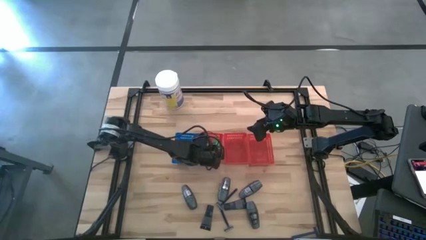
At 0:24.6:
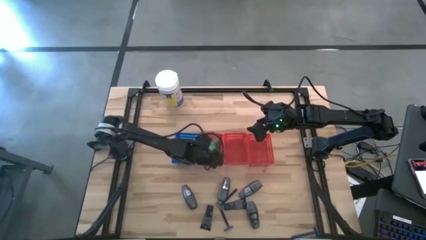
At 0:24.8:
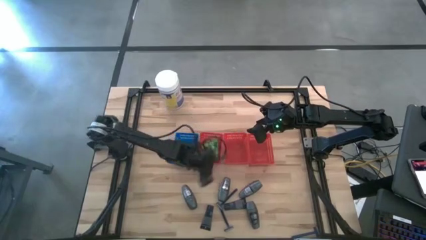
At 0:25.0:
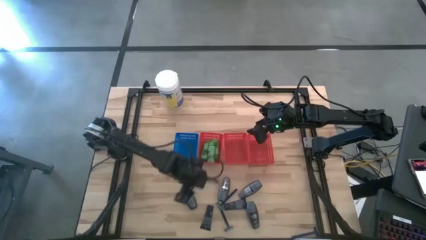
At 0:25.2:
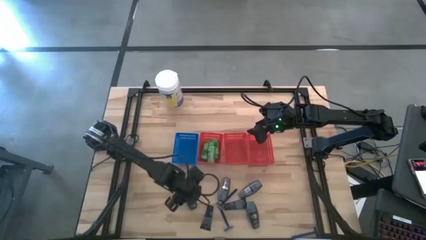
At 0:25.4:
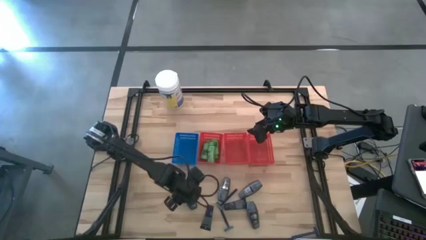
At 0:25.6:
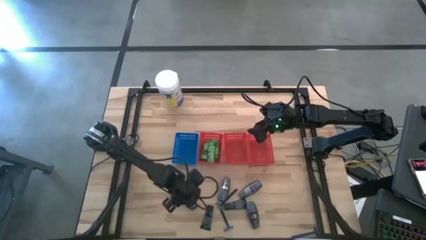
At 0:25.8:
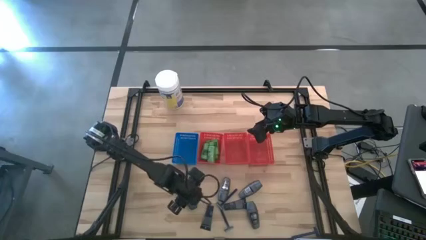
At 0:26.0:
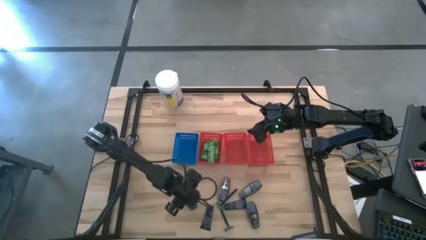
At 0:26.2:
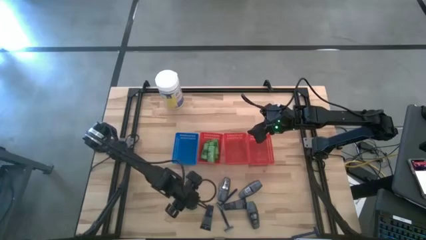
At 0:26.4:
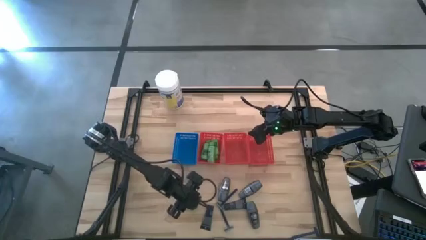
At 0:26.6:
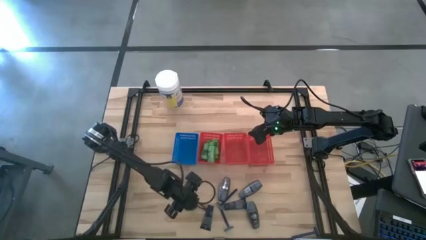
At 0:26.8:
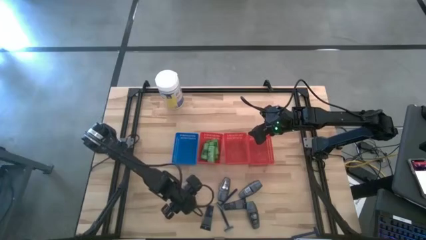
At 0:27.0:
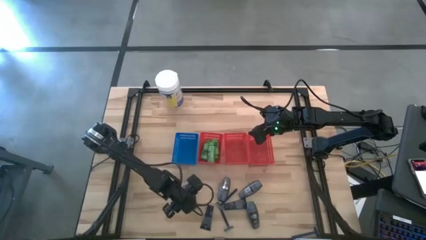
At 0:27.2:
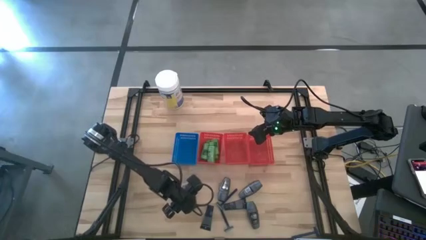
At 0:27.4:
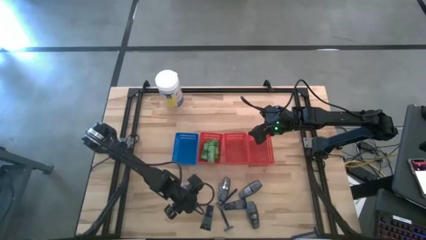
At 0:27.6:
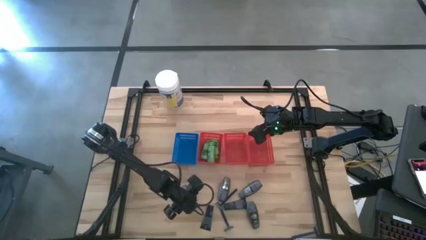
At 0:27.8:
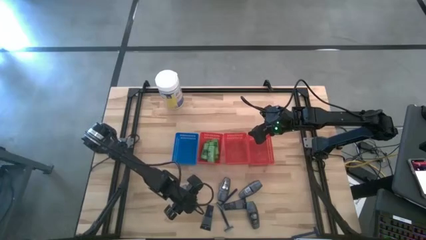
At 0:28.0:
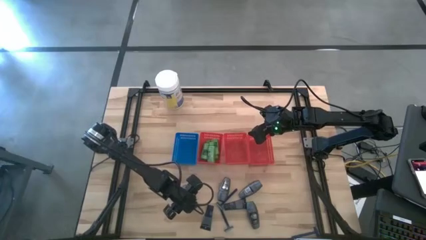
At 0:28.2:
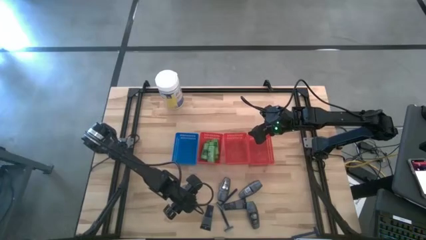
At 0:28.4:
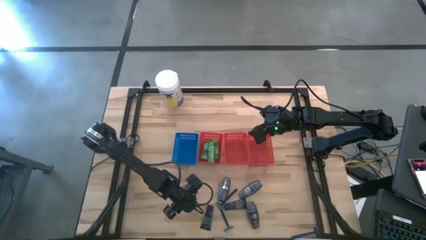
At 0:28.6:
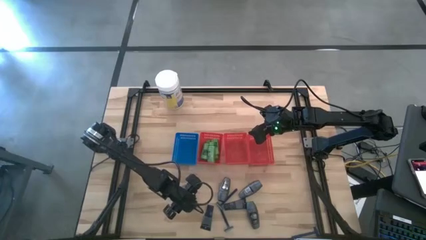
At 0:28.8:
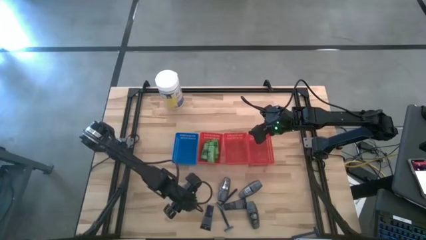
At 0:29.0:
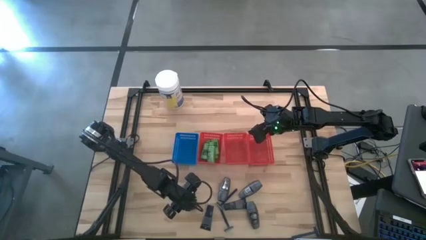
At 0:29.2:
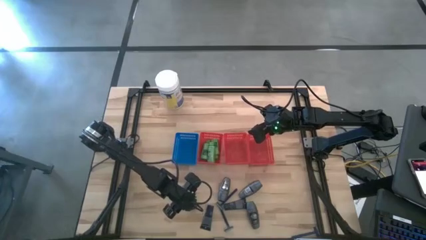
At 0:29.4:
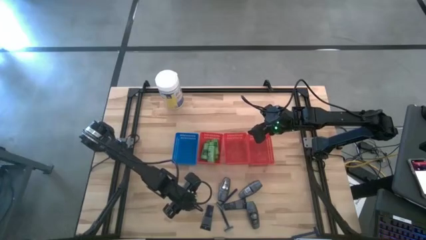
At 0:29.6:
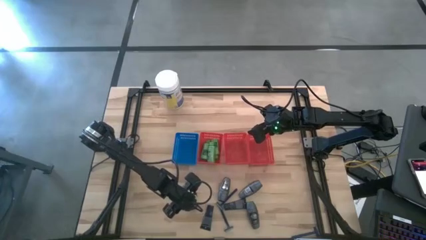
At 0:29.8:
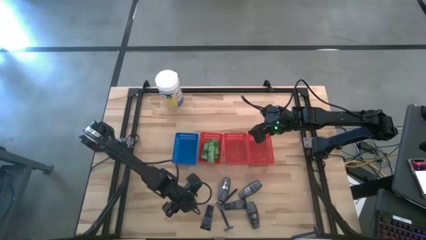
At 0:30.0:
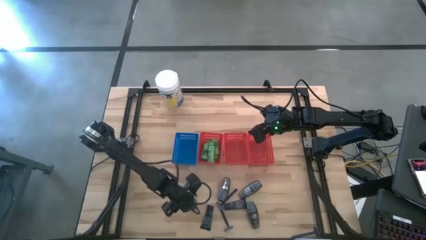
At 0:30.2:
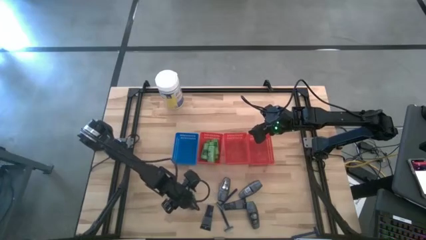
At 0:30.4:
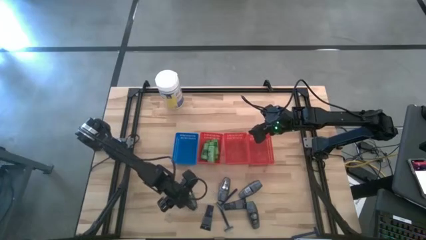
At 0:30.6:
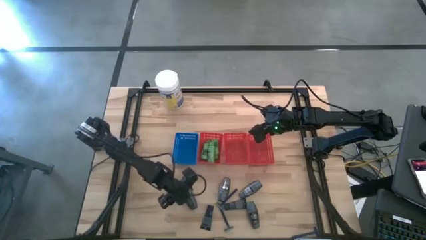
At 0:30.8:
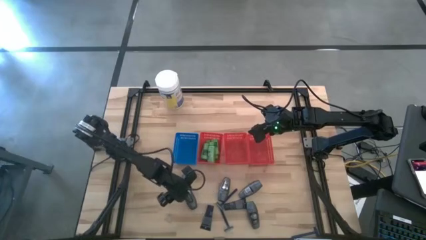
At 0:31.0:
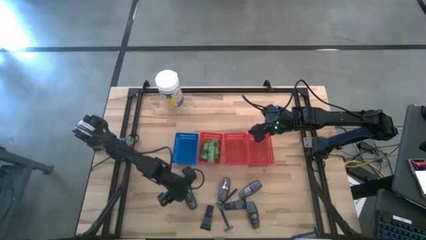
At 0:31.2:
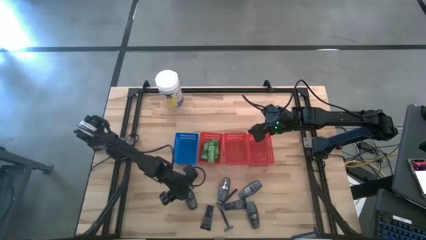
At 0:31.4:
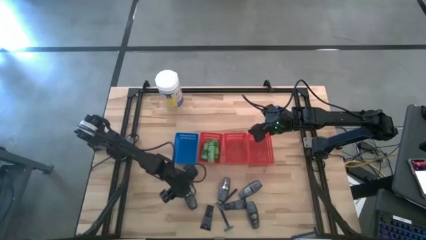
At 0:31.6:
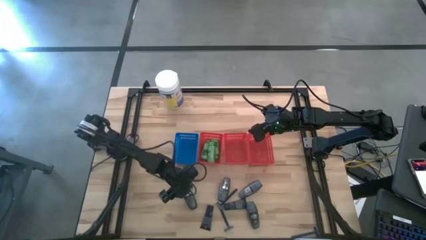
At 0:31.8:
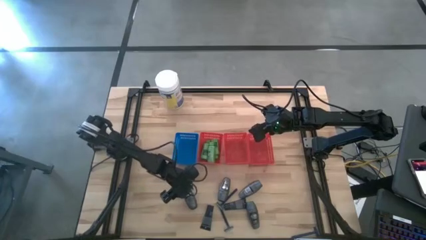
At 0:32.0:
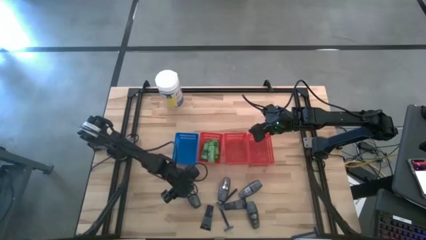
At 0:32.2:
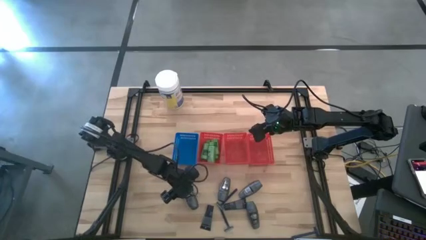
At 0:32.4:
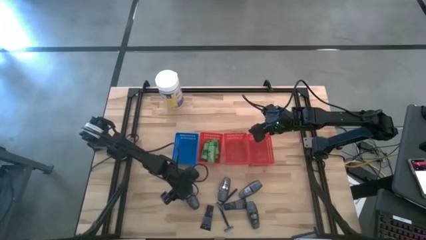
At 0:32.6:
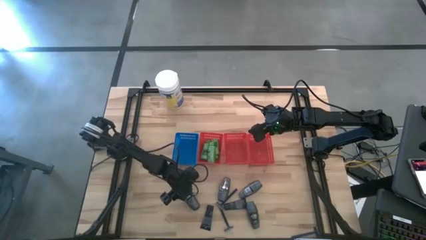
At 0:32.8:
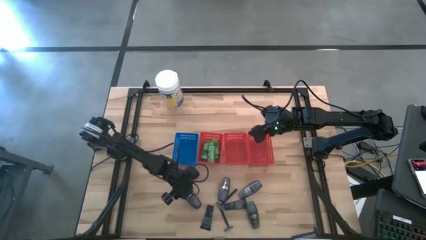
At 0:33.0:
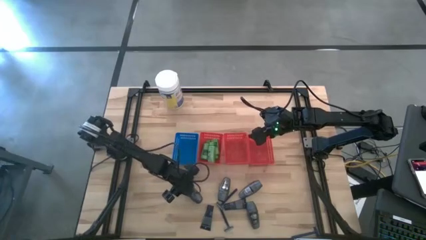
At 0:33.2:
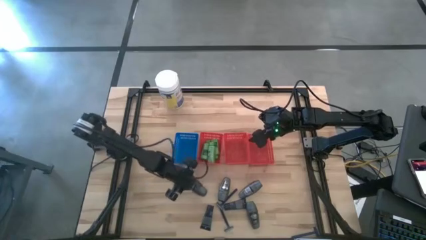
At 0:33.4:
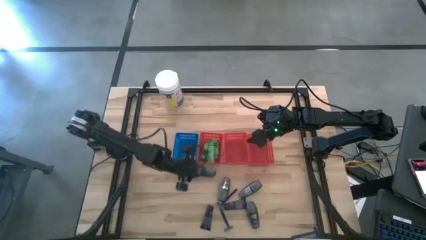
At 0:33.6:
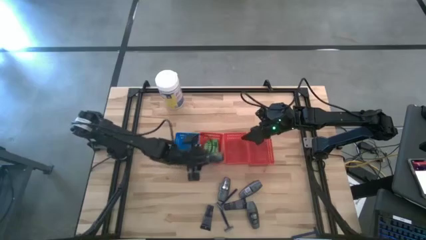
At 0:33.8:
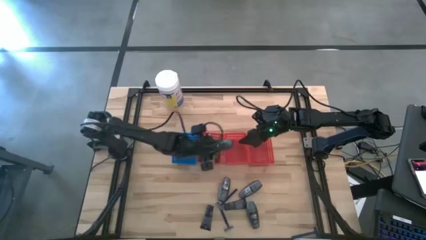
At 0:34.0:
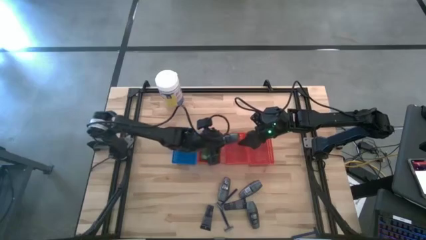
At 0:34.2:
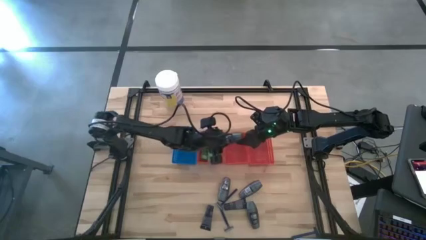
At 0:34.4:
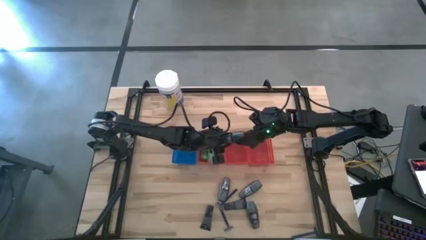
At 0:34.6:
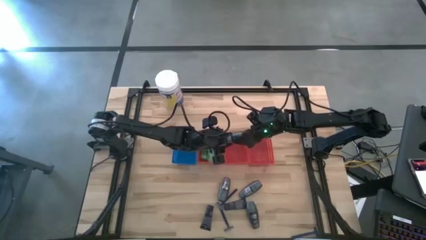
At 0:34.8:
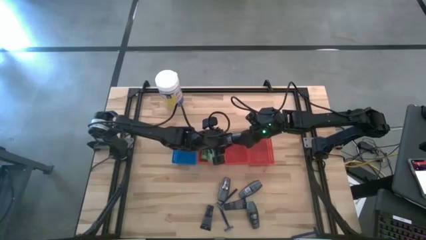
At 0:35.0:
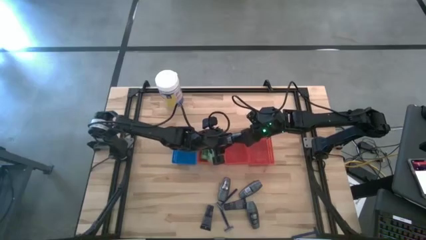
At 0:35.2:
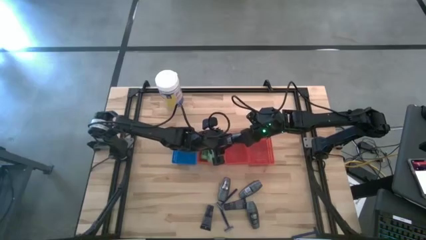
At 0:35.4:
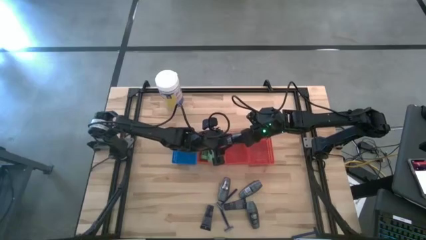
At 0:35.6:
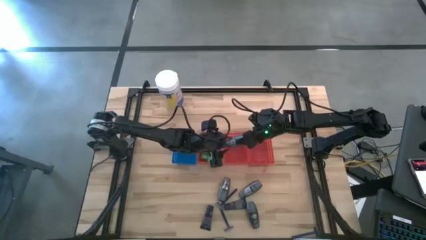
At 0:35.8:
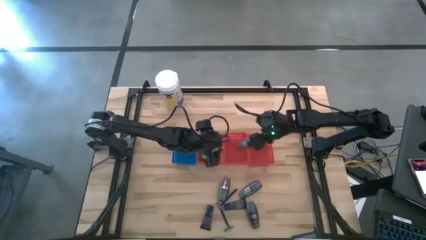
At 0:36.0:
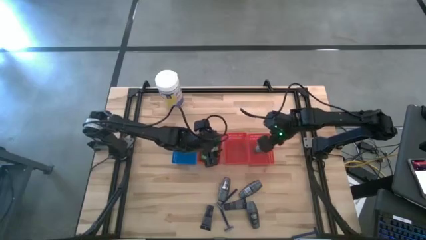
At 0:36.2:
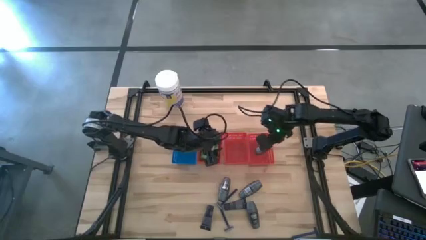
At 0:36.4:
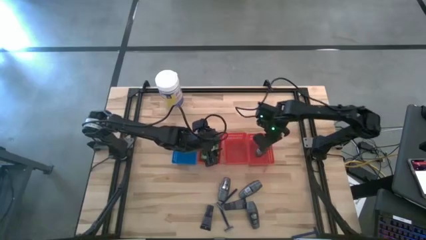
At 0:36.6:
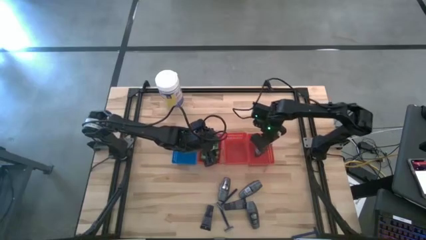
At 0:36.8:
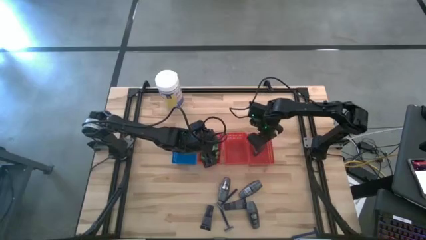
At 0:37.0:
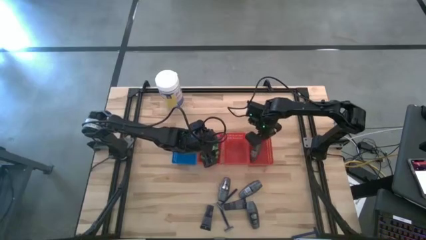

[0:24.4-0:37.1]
Task: Pick & Place Travel size toiletries
Put the gray deodorant into the right red basket

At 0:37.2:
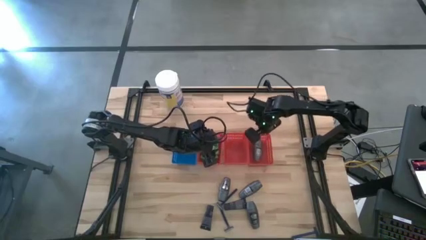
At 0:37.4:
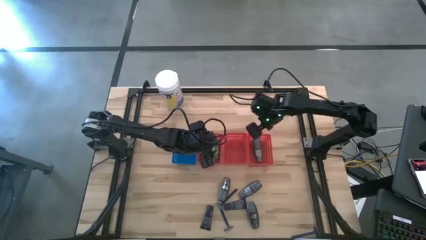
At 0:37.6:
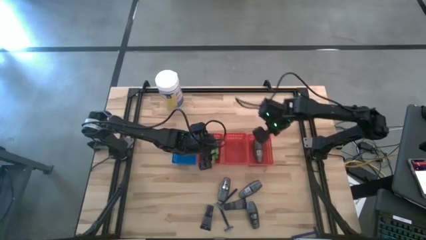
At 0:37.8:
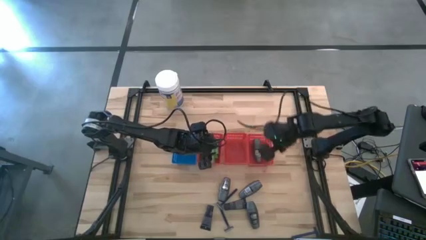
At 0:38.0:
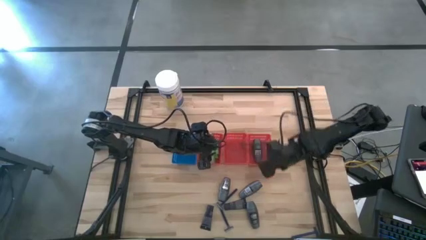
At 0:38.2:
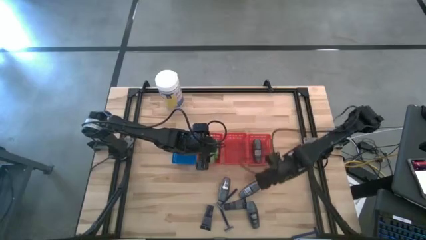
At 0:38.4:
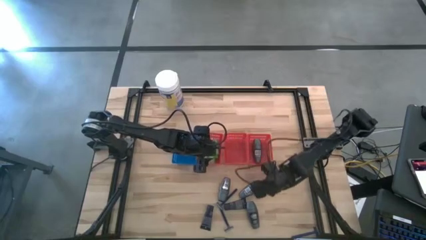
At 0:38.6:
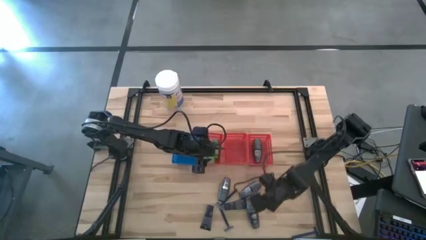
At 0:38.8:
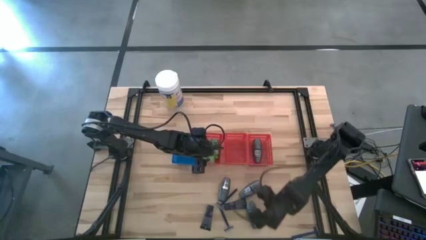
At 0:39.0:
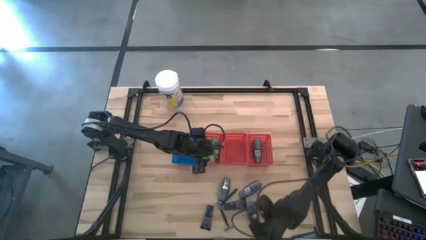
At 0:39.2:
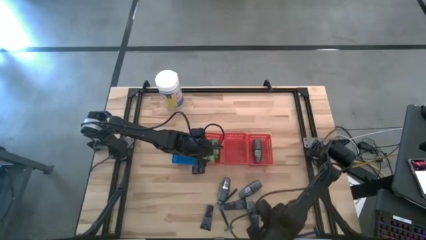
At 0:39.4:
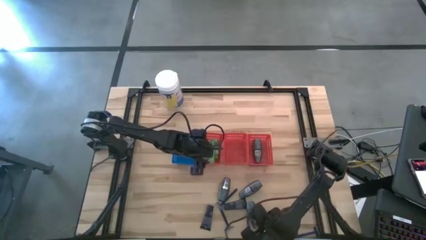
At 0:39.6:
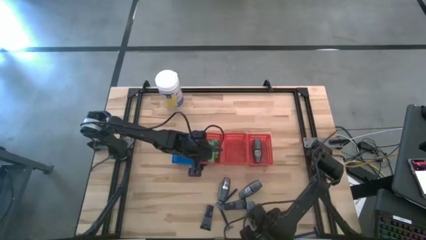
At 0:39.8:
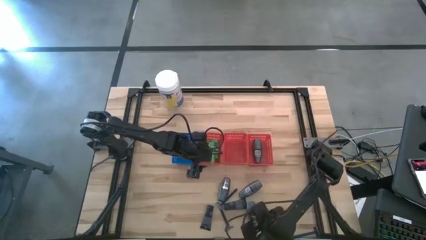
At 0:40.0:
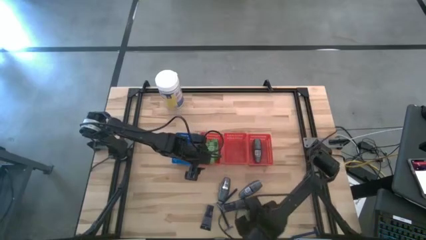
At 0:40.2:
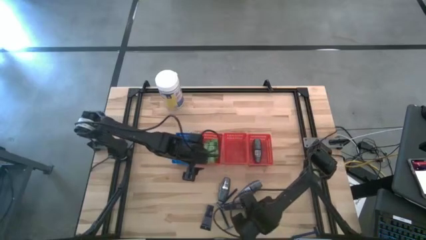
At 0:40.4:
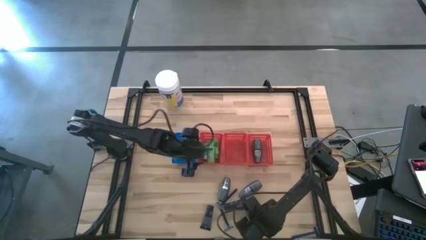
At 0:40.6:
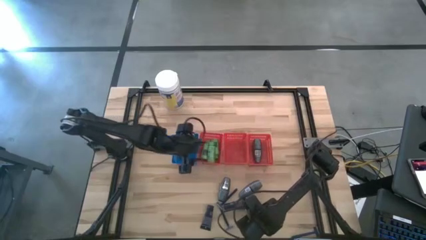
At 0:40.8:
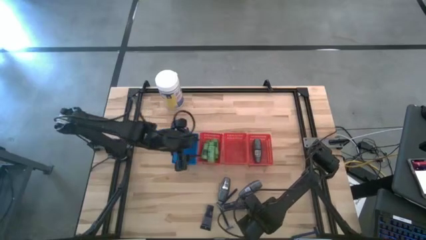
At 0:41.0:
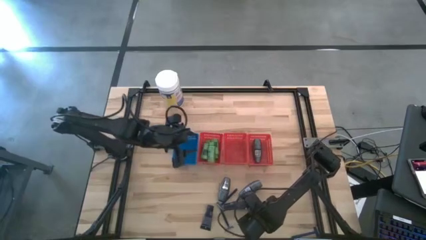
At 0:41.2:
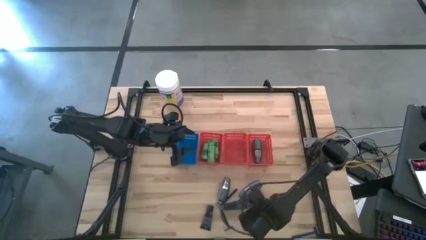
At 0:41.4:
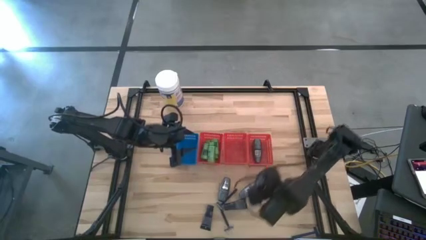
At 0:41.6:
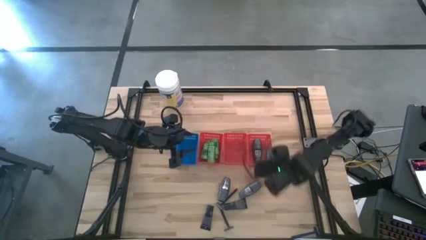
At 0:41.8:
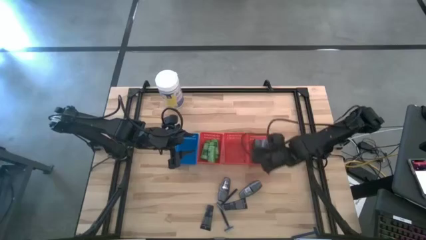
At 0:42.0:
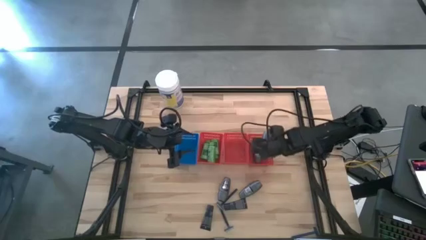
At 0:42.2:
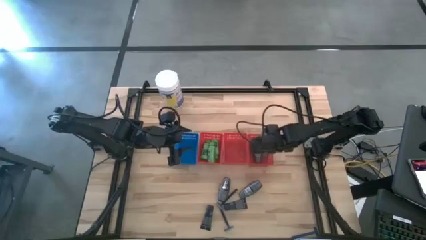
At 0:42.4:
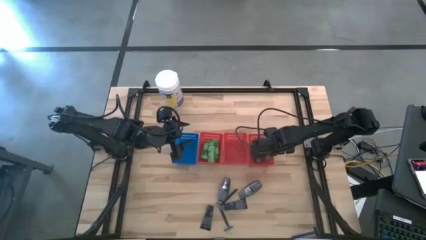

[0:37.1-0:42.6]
Put the gray deodorant into the right red basket
